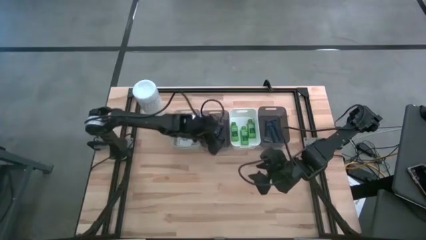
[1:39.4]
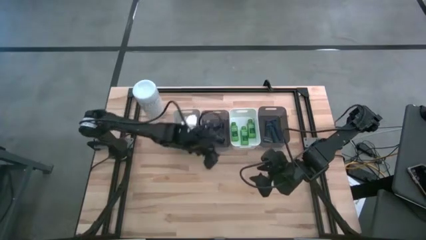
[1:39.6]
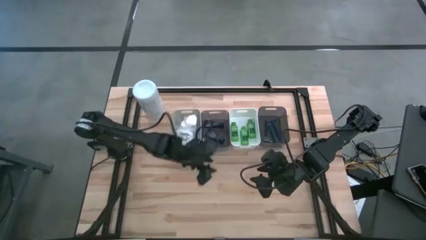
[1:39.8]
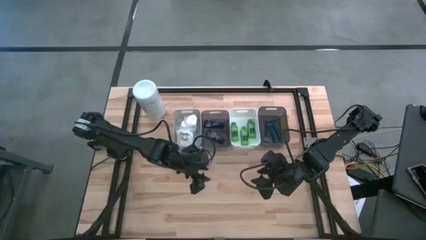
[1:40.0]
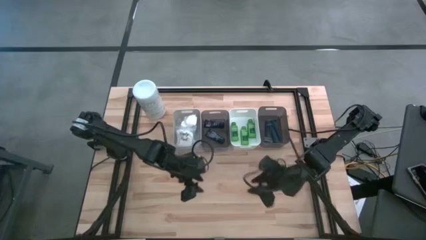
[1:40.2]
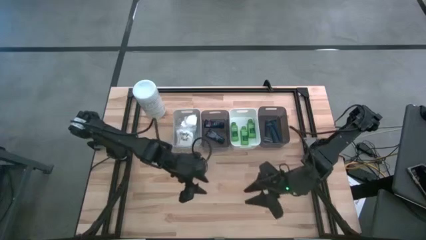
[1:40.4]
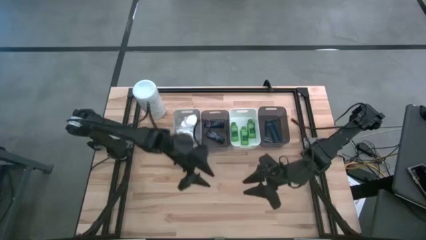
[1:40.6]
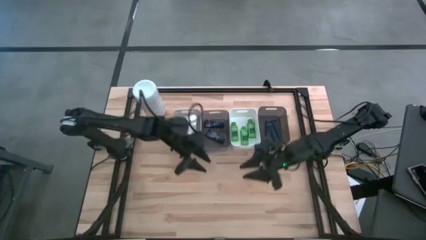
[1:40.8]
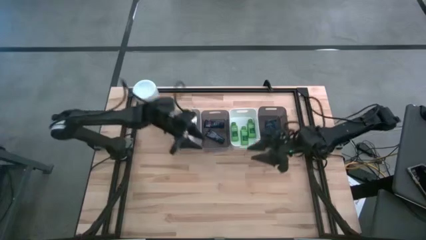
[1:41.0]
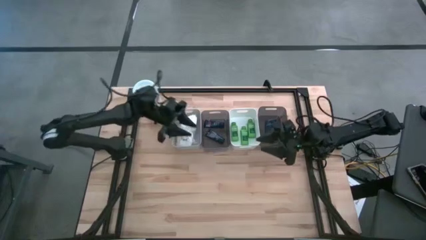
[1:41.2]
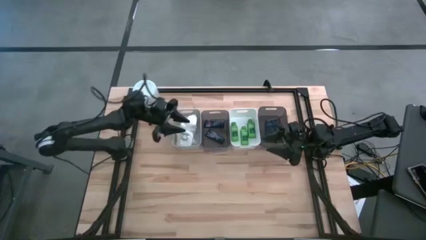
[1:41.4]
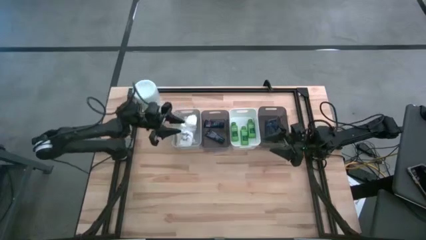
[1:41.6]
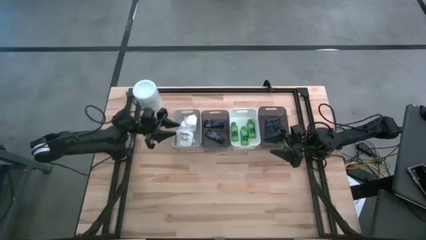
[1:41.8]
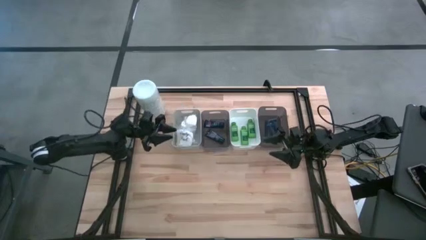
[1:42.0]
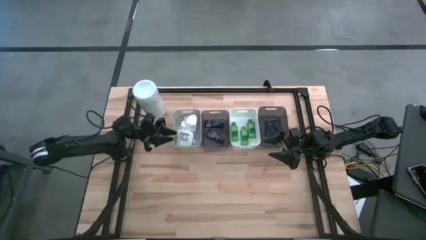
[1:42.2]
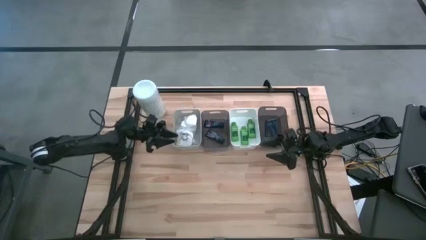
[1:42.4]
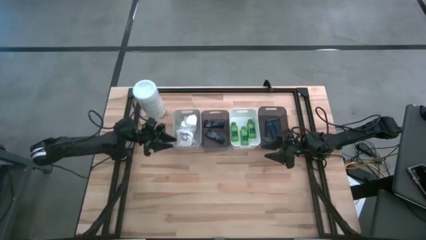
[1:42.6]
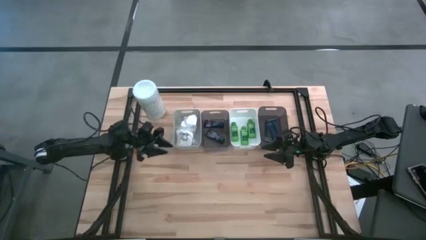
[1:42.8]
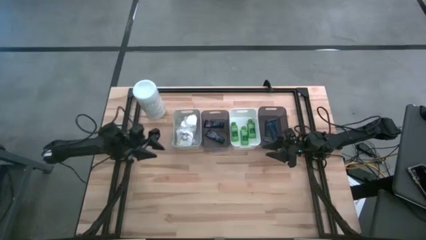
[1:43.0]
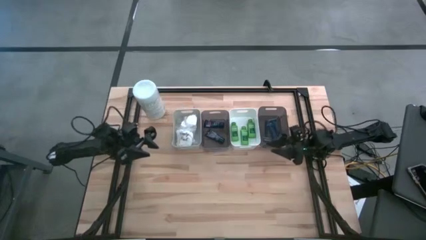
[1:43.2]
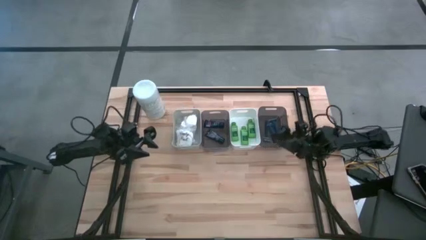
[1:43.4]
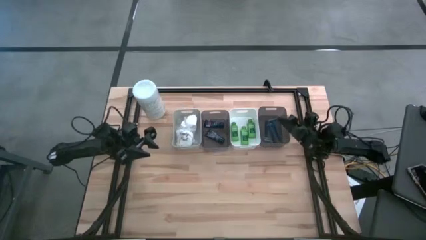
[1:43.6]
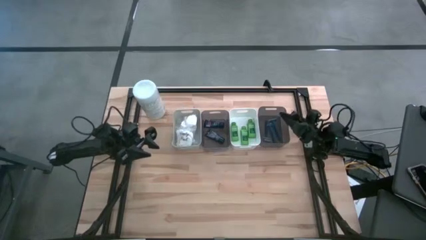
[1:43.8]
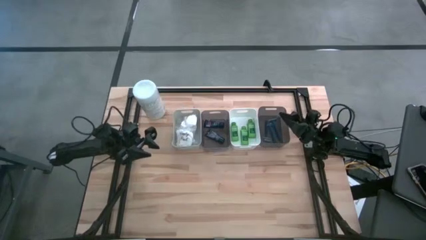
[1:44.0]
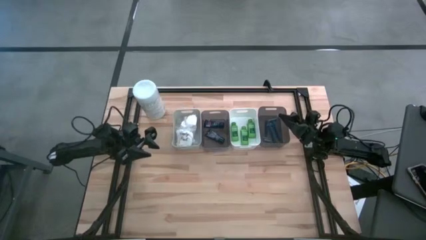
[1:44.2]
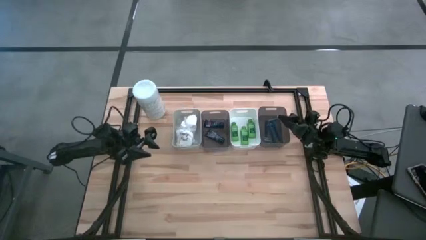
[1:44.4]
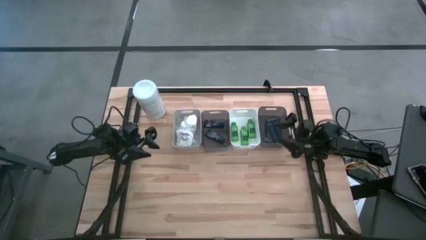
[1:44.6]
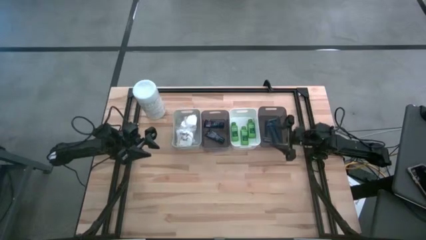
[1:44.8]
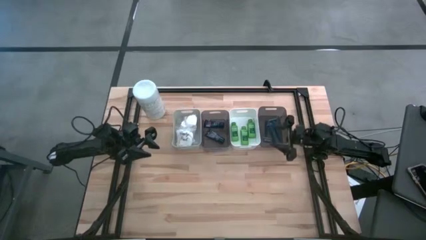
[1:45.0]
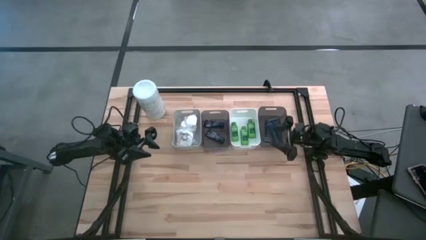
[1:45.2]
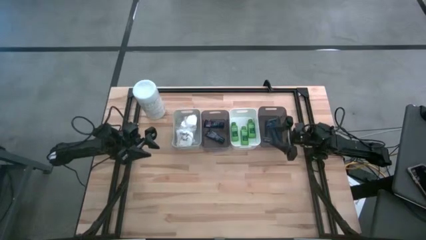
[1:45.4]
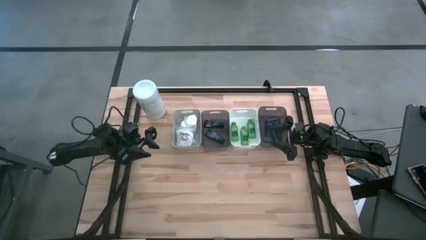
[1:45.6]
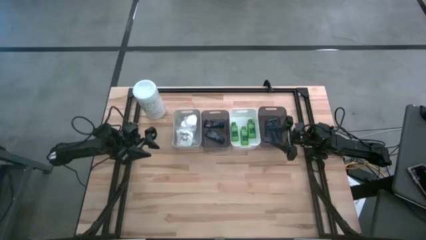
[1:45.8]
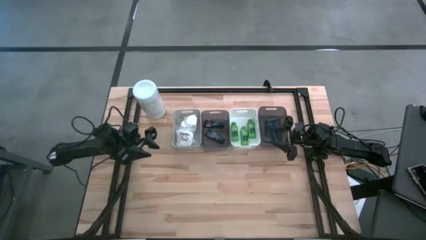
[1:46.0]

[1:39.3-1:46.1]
Task: Pick & Place Travel size toiletries
Return to Home Position

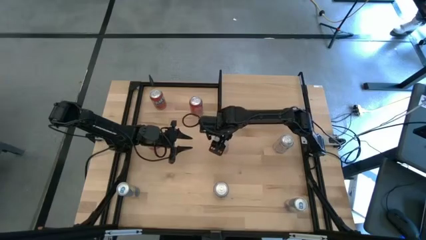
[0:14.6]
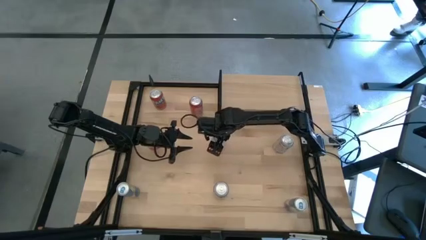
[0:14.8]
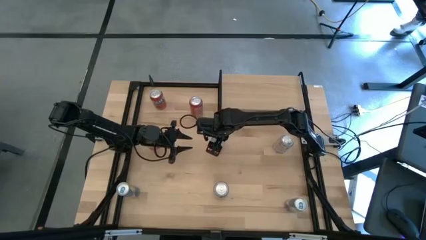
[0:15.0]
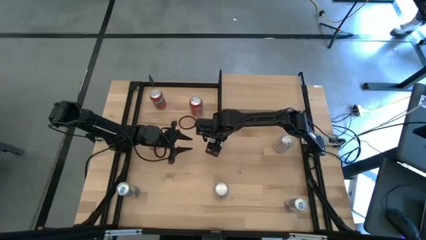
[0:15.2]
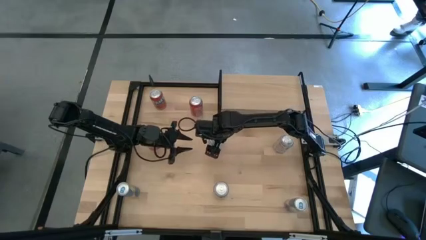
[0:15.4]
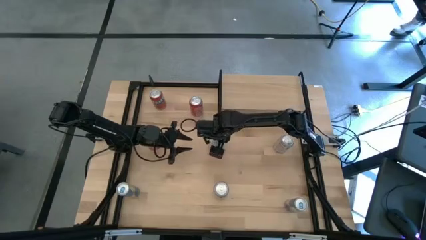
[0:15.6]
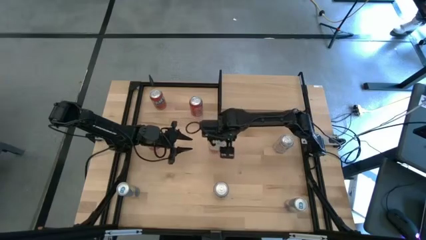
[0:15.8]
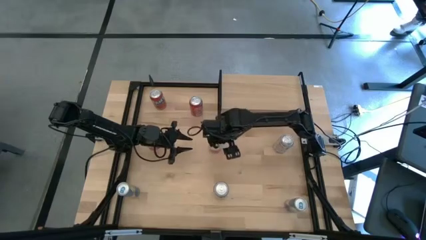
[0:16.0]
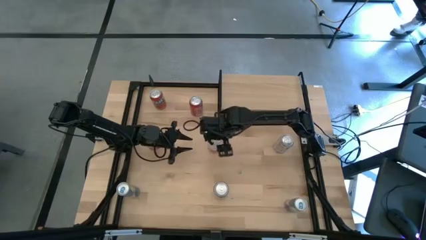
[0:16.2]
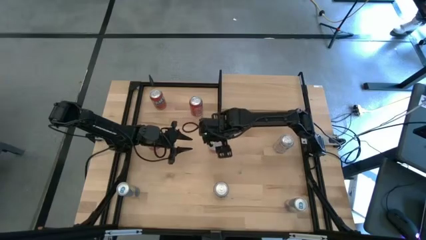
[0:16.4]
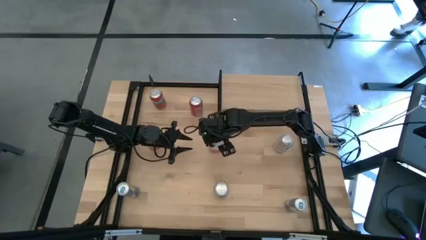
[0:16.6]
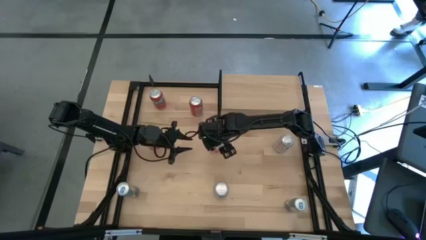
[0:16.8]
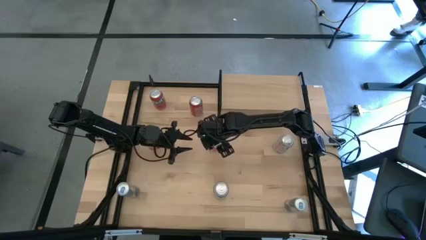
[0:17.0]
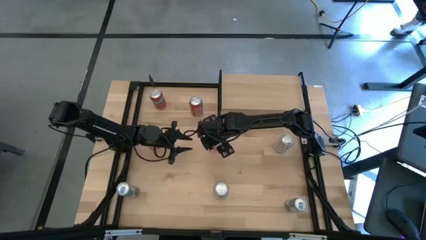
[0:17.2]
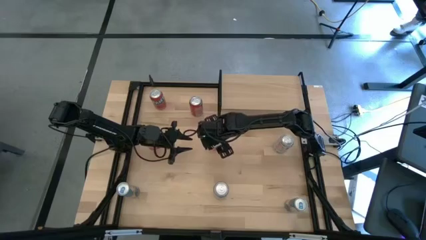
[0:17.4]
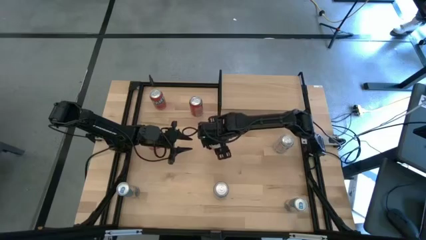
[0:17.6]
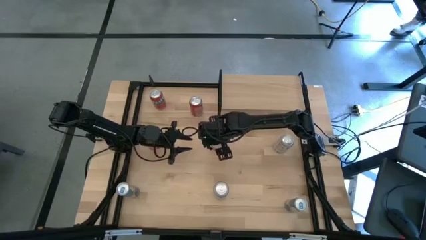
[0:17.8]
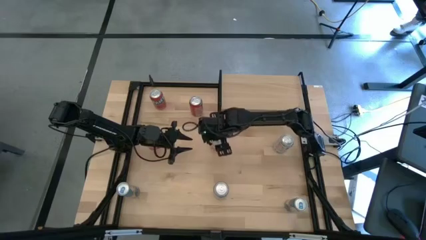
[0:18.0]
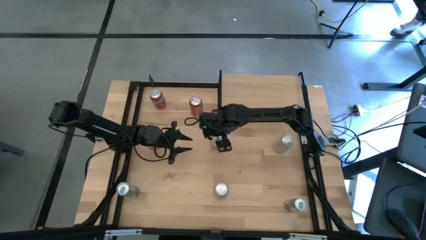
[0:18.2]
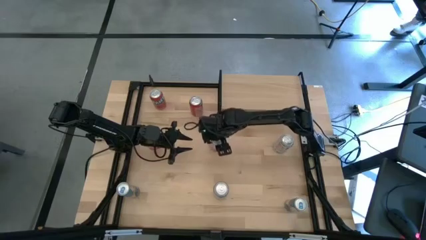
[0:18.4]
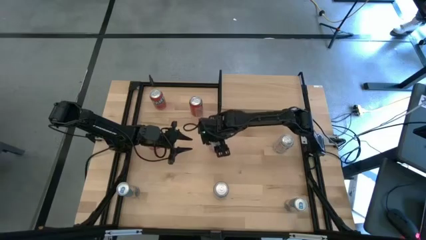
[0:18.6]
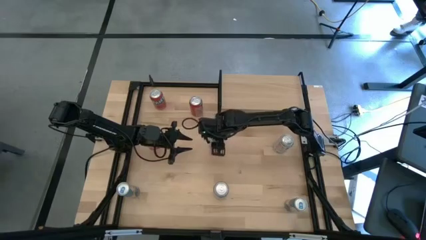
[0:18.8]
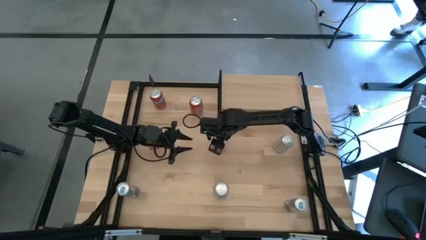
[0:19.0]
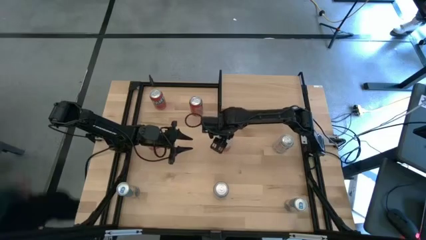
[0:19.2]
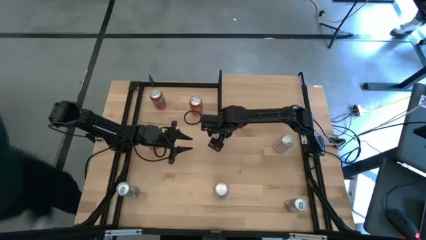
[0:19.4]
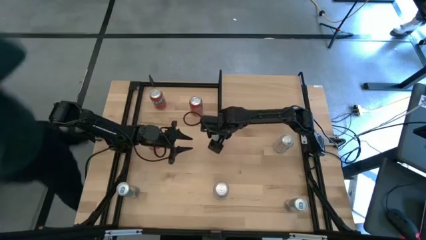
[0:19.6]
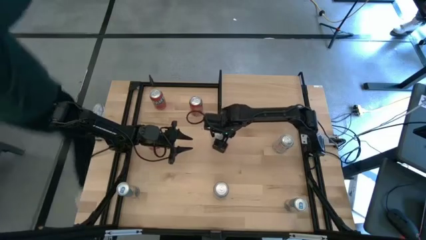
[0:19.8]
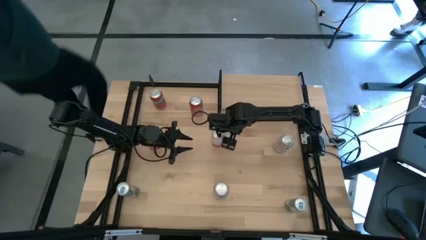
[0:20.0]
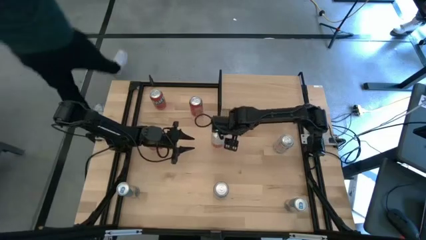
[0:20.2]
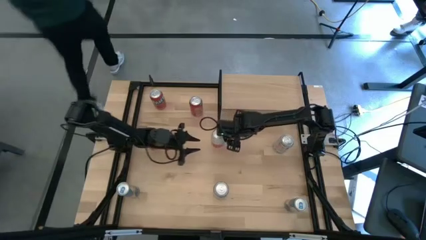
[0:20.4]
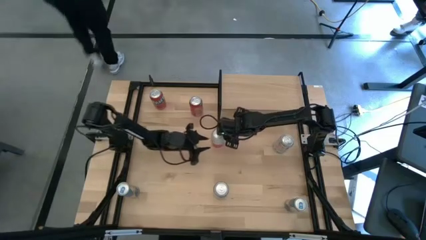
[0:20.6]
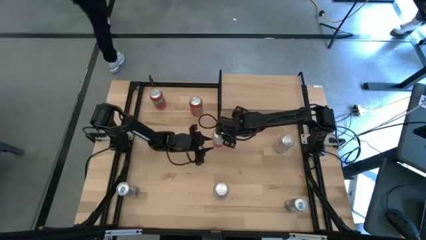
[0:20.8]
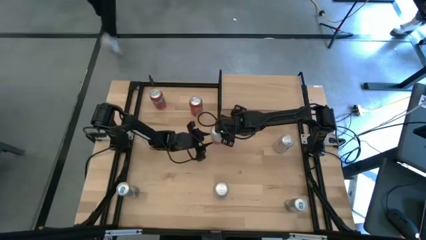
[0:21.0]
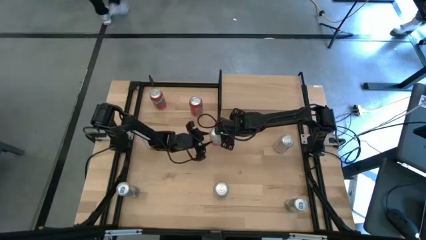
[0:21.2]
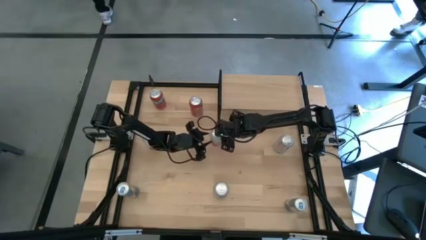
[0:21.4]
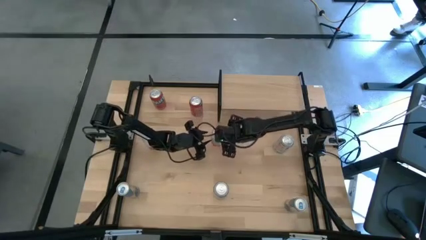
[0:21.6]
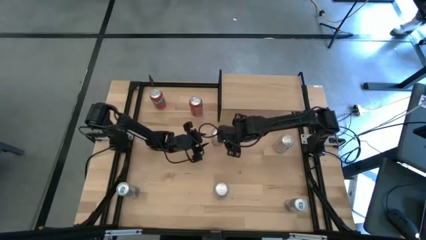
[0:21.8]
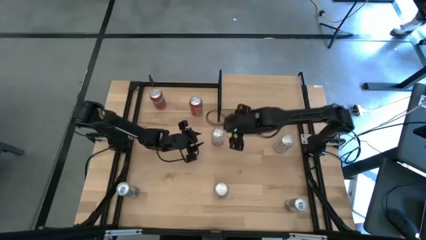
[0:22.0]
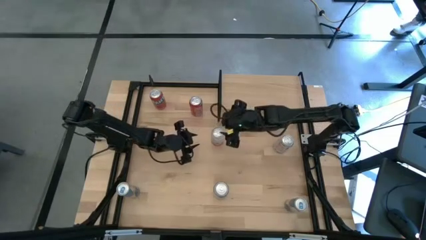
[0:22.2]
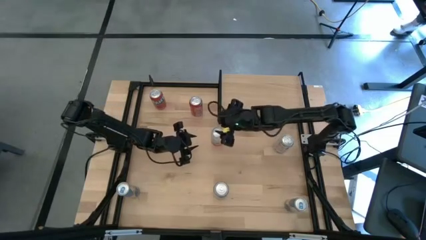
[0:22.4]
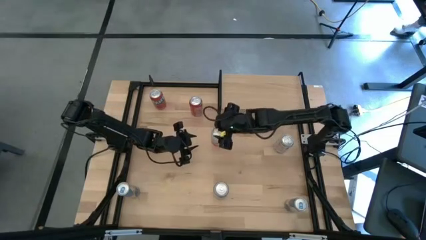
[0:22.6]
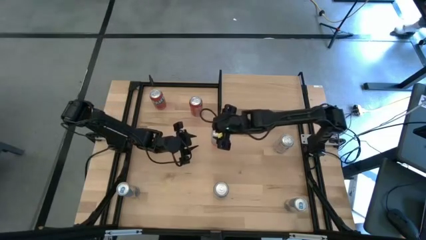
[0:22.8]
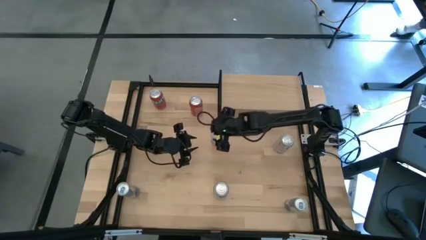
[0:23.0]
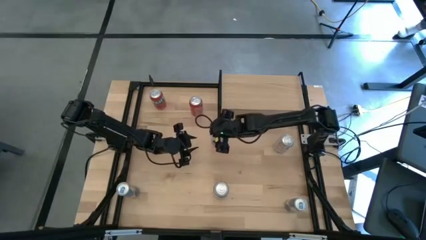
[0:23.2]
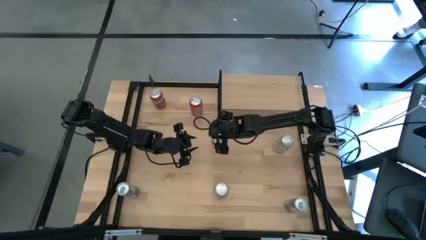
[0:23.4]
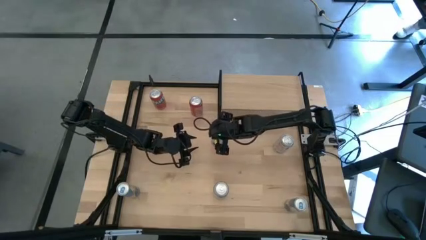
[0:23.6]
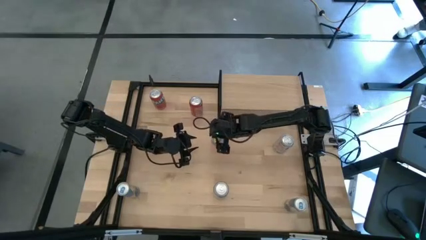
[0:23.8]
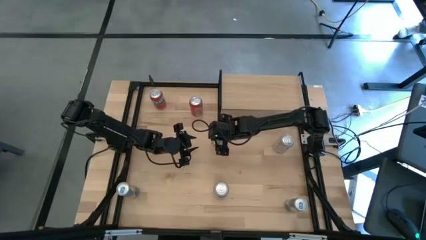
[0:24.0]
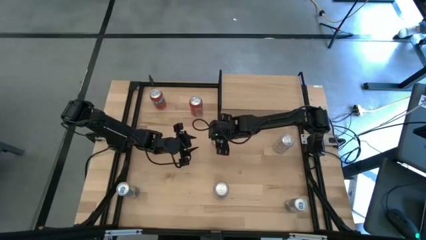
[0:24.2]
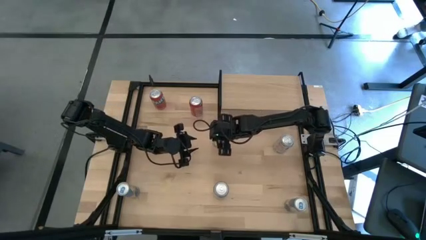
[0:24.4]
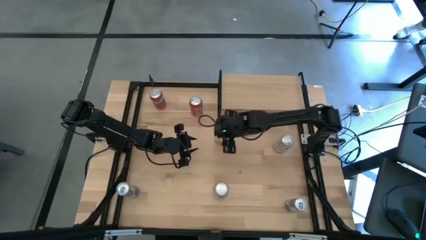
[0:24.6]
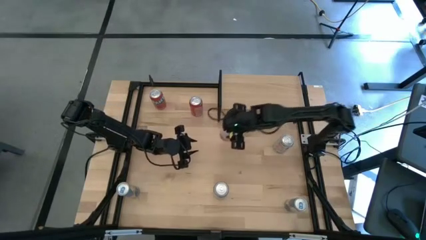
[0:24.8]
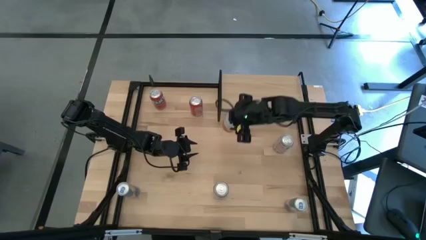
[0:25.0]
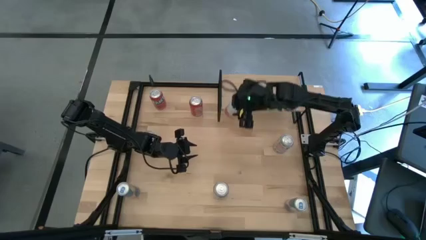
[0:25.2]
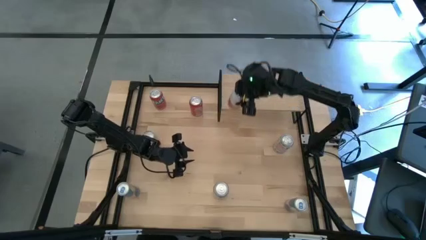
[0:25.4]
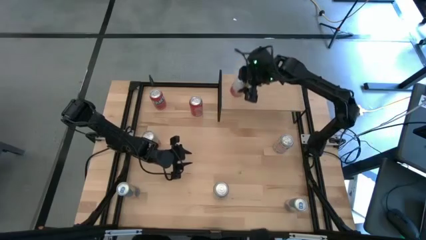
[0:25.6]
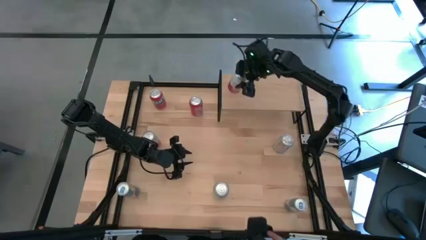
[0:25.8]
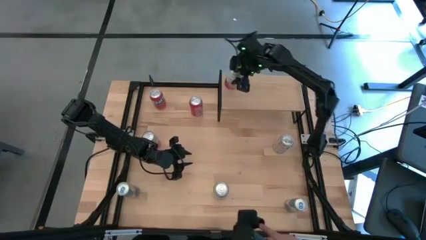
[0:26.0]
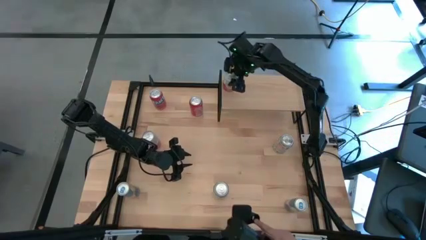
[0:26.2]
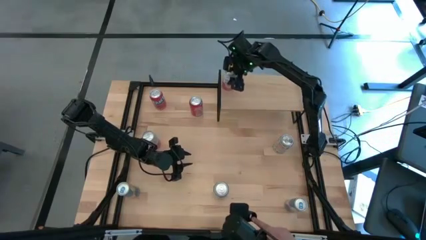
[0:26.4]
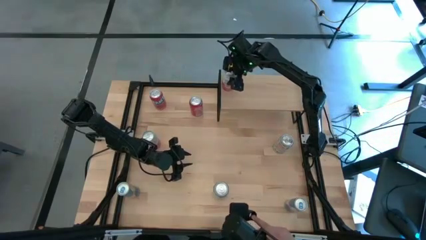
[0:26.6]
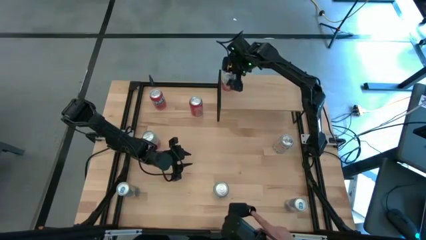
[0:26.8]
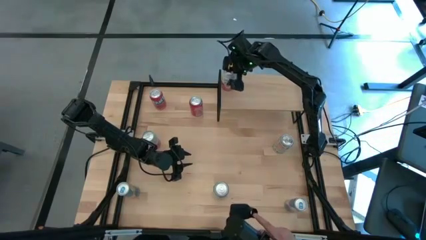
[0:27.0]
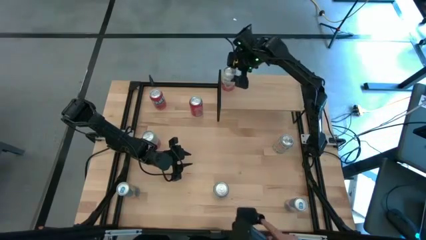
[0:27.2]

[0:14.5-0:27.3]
Task: Place canned beverage on shelf
Put the right pink soda can on the shelf
